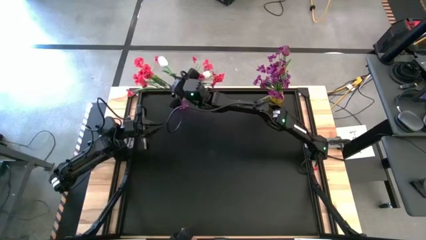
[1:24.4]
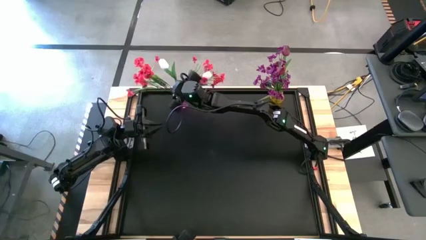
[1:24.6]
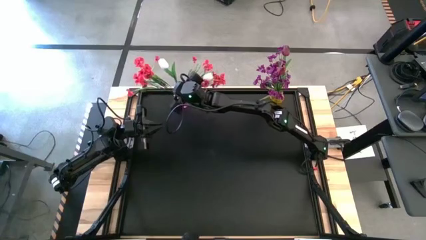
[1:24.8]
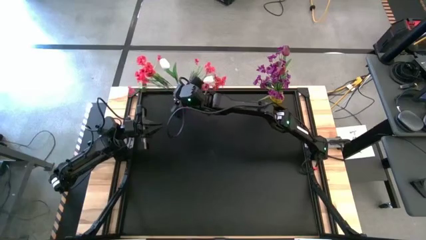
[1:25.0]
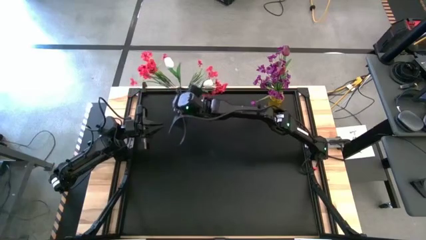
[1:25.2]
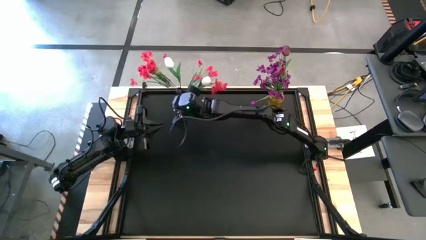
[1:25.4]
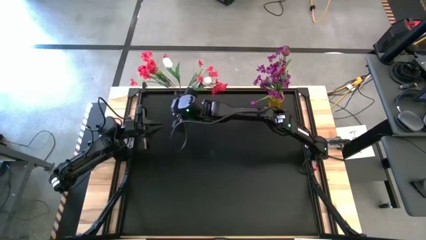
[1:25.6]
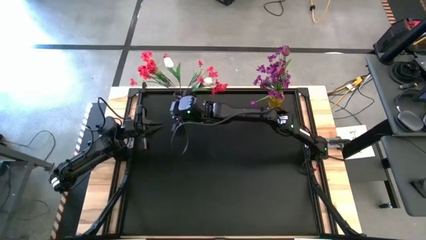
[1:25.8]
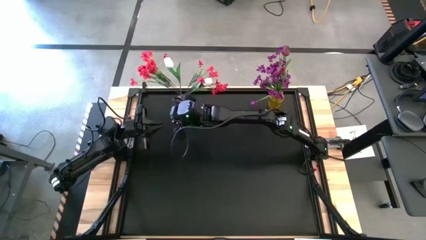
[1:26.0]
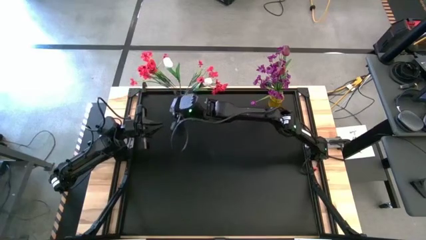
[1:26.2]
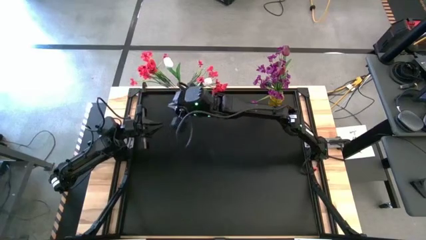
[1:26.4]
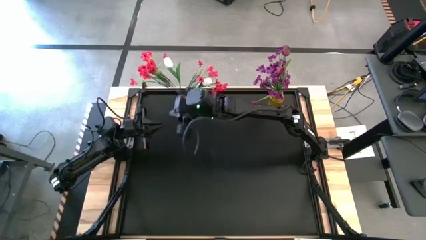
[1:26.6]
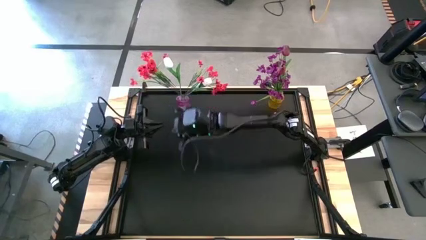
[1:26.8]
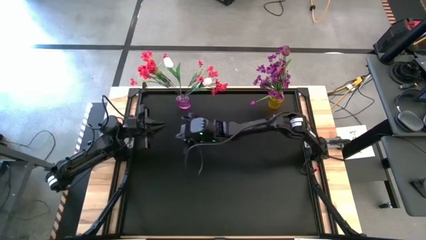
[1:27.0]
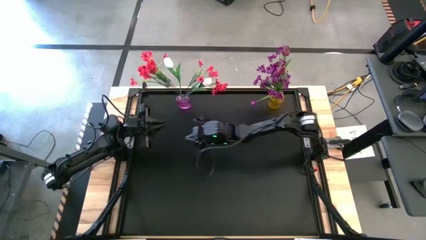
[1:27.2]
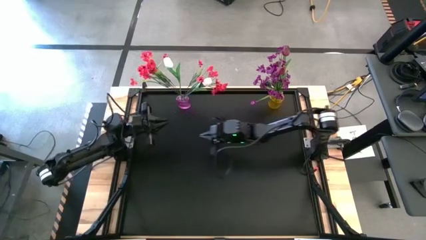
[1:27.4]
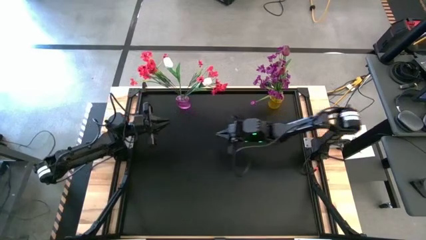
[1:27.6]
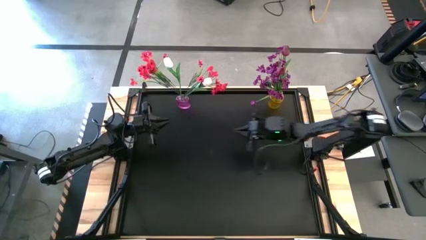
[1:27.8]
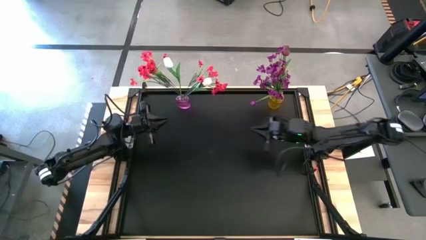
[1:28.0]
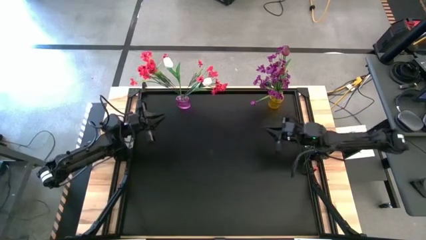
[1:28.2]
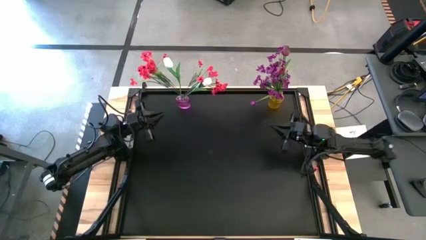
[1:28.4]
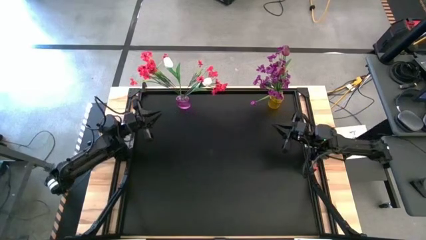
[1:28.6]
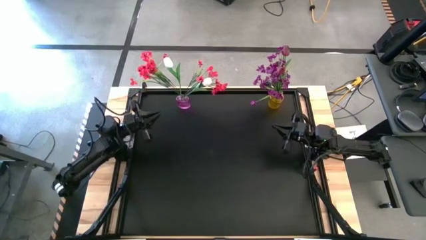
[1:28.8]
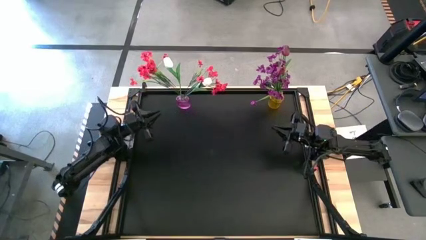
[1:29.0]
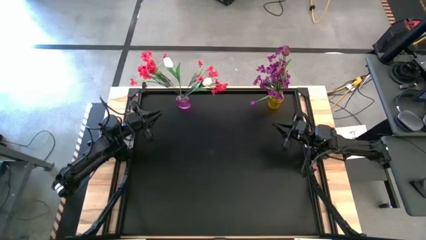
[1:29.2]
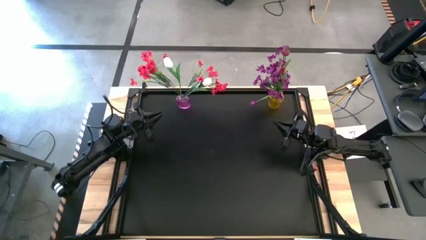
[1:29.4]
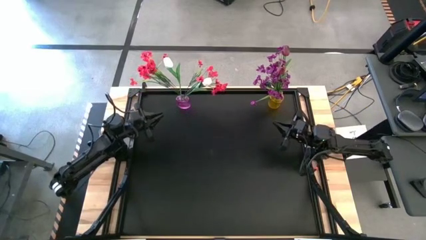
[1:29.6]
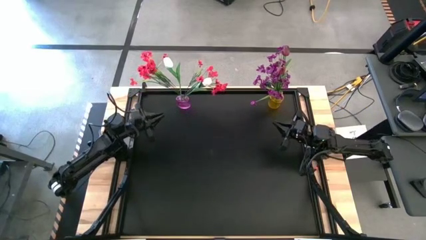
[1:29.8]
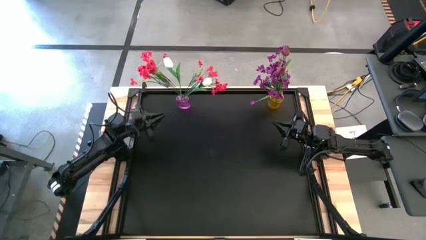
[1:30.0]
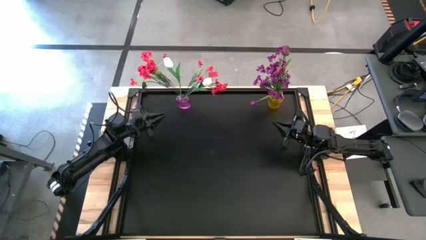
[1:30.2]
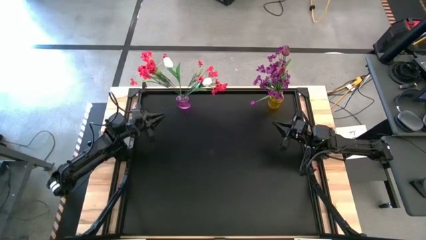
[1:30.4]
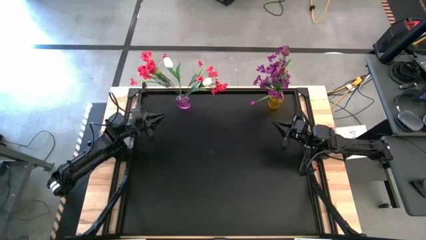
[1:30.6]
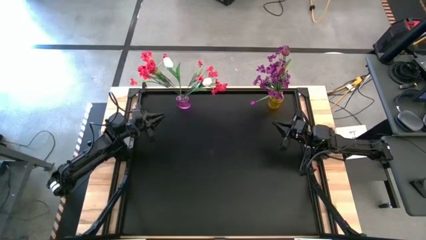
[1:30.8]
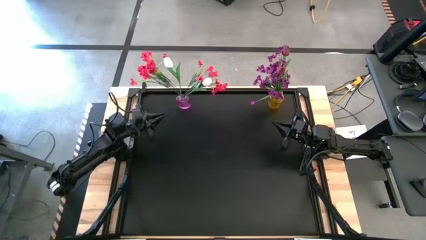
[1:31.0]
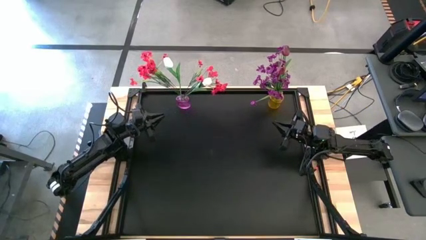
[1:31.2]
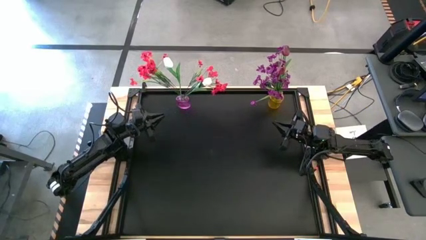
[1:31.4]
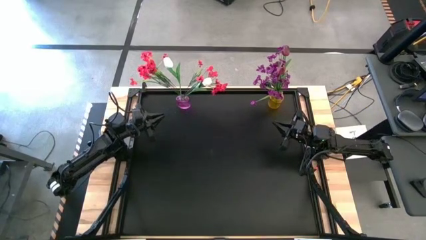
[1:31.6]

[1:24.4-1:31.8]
Task: Sort flowers into vase by color
Return to Home Position

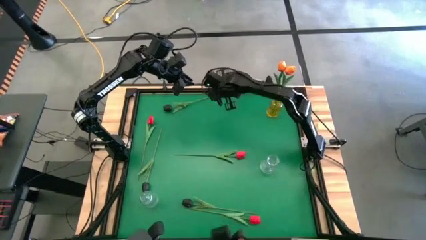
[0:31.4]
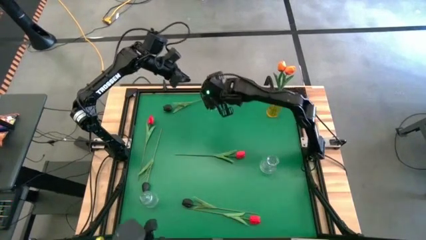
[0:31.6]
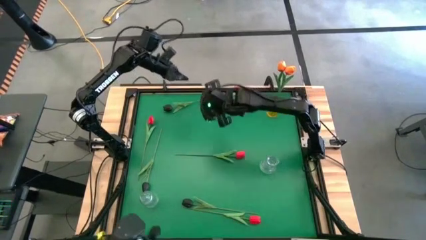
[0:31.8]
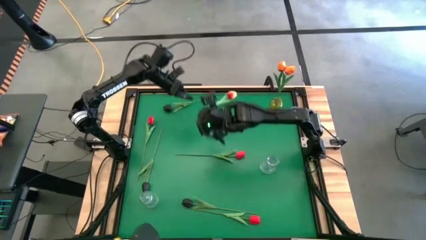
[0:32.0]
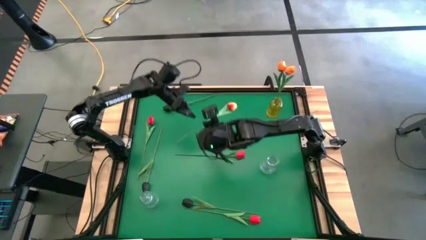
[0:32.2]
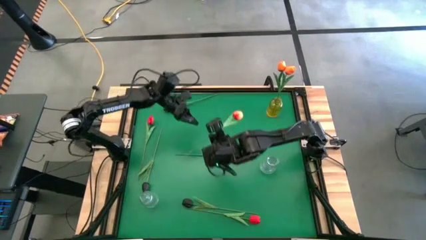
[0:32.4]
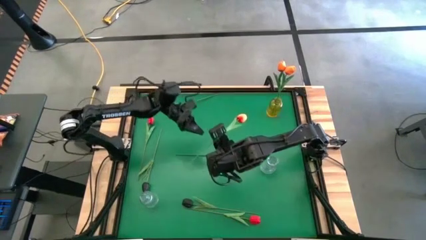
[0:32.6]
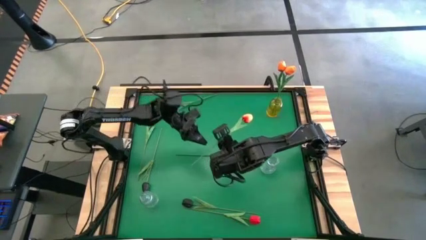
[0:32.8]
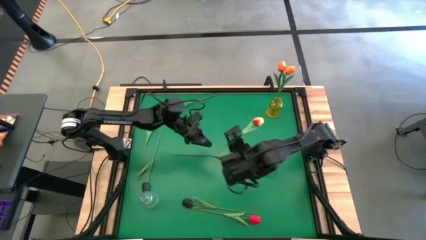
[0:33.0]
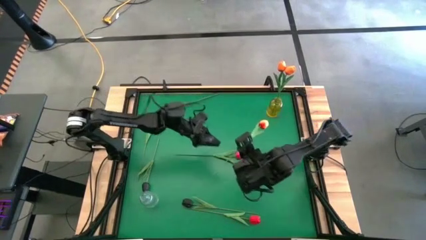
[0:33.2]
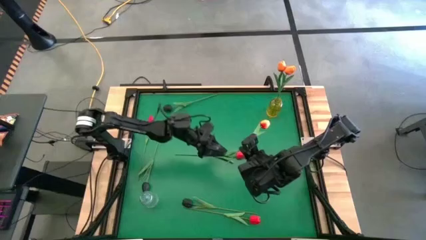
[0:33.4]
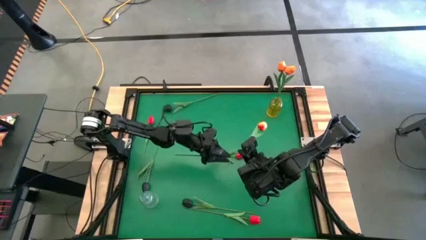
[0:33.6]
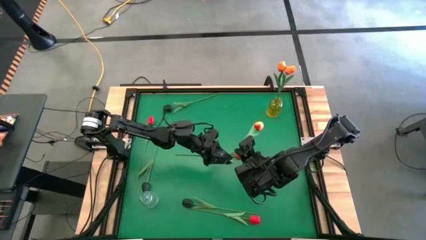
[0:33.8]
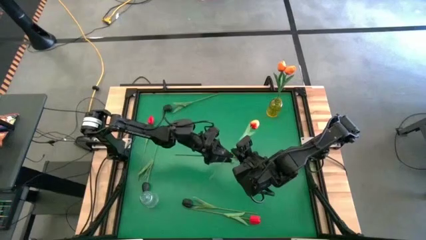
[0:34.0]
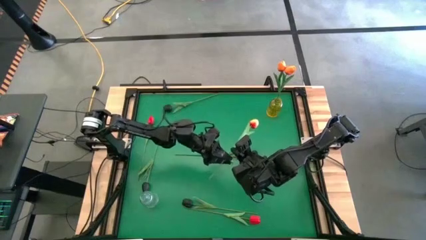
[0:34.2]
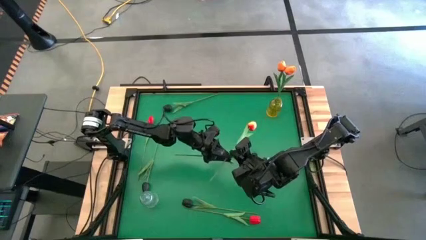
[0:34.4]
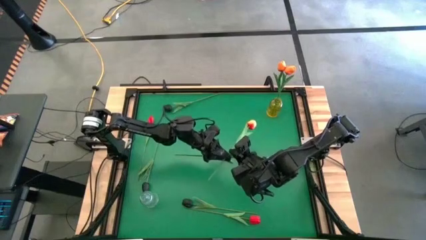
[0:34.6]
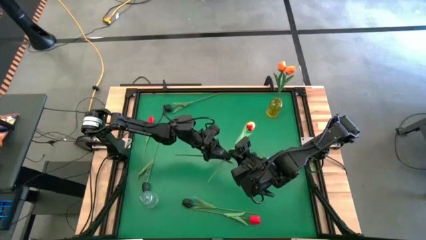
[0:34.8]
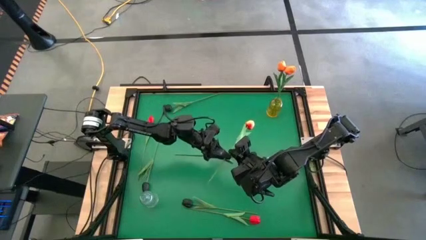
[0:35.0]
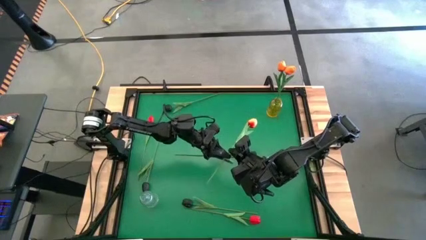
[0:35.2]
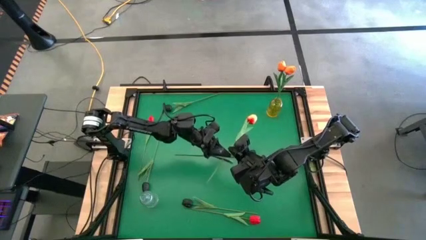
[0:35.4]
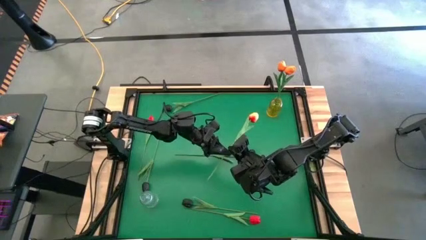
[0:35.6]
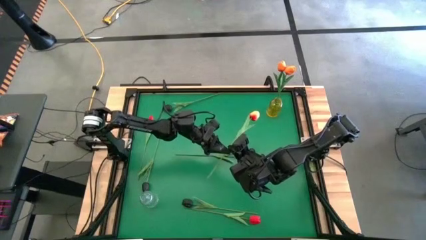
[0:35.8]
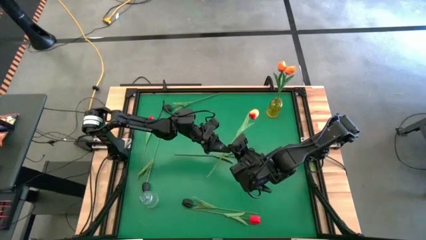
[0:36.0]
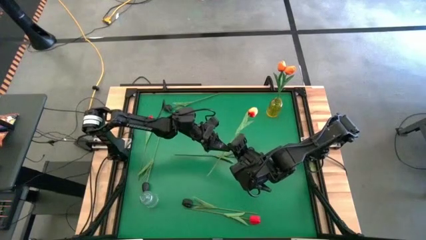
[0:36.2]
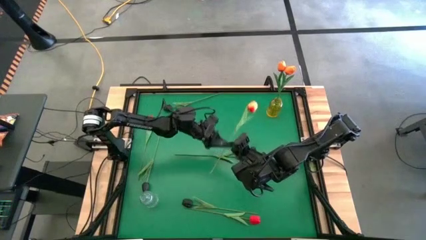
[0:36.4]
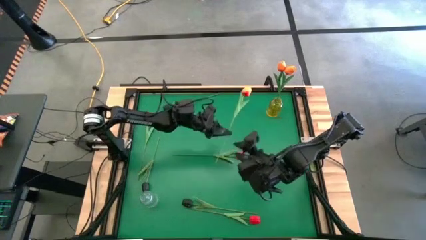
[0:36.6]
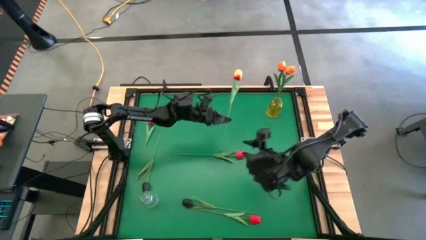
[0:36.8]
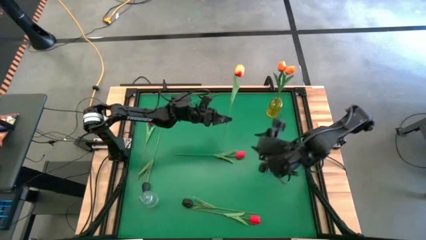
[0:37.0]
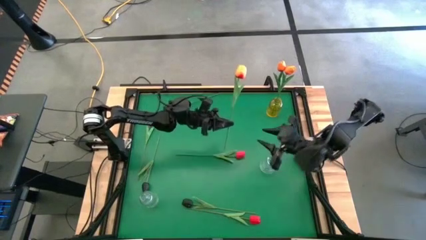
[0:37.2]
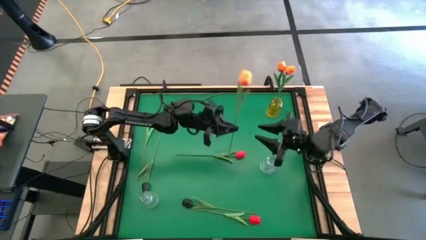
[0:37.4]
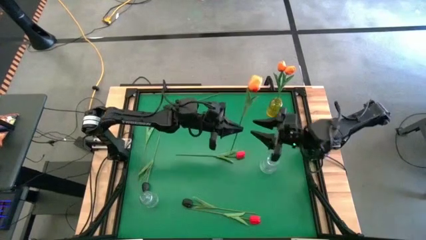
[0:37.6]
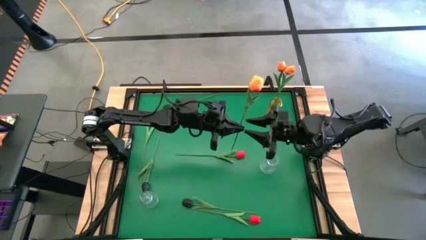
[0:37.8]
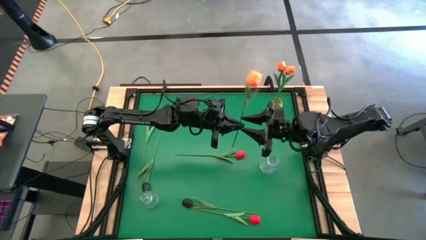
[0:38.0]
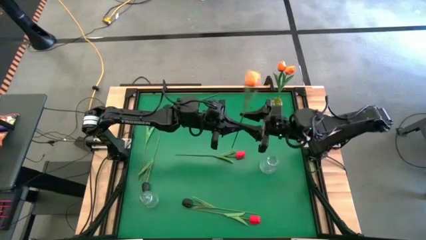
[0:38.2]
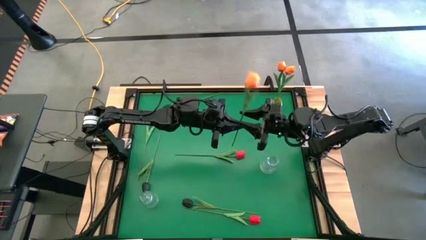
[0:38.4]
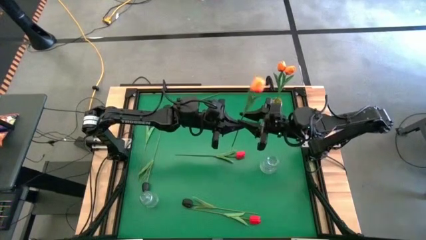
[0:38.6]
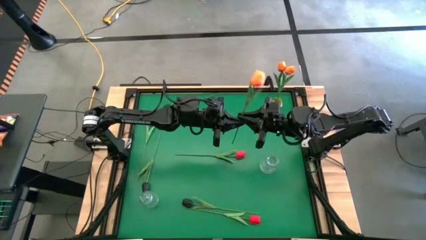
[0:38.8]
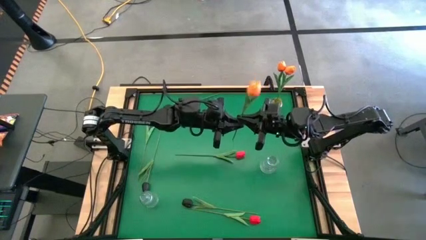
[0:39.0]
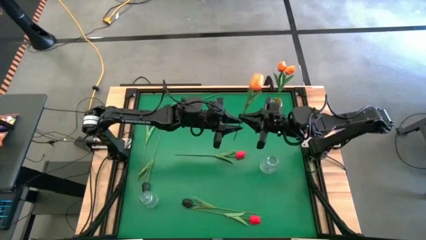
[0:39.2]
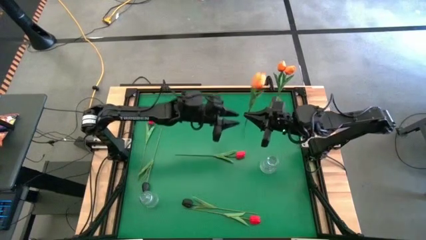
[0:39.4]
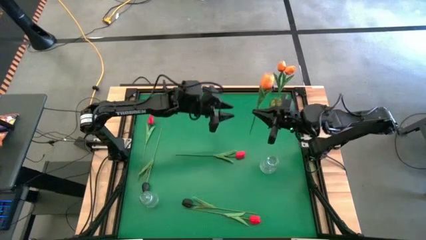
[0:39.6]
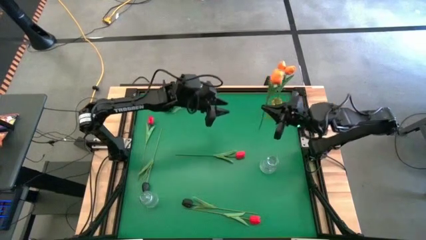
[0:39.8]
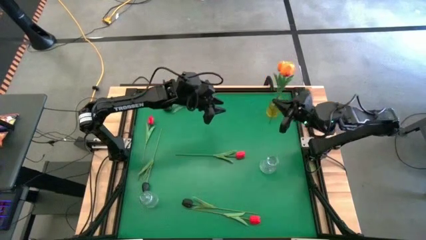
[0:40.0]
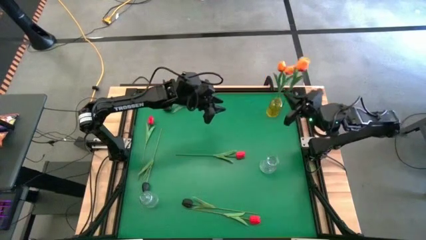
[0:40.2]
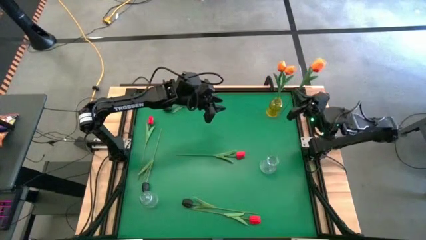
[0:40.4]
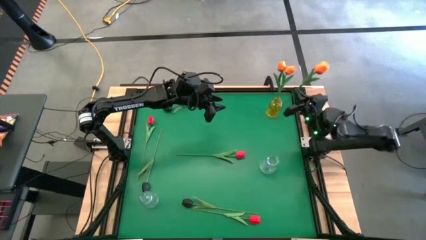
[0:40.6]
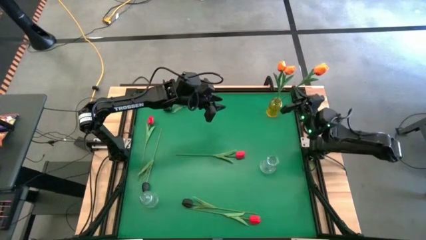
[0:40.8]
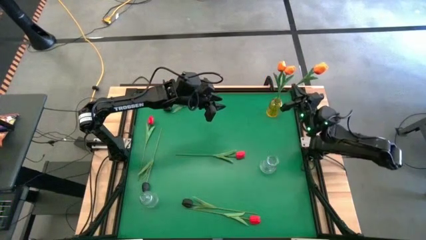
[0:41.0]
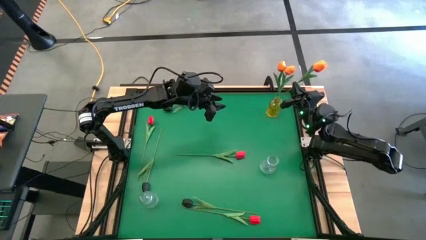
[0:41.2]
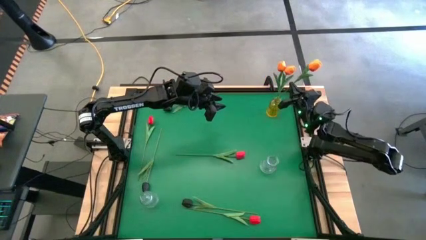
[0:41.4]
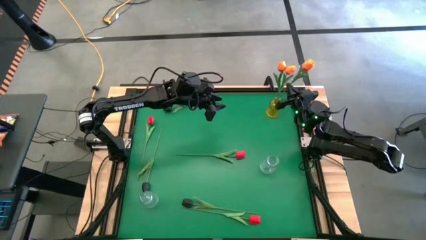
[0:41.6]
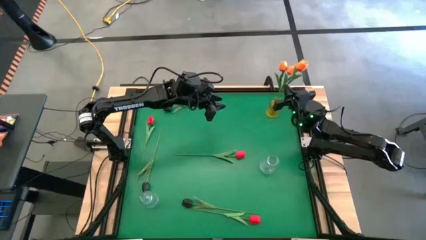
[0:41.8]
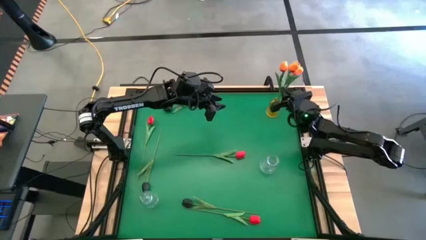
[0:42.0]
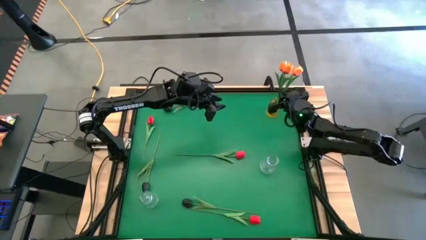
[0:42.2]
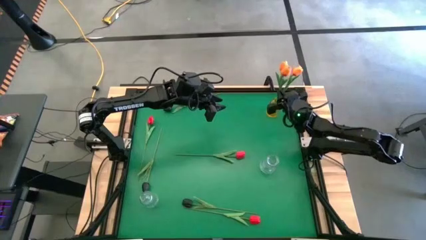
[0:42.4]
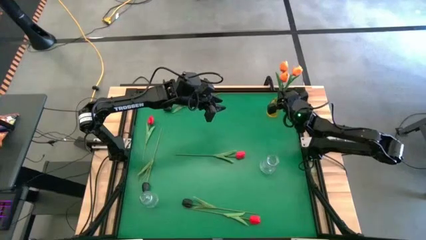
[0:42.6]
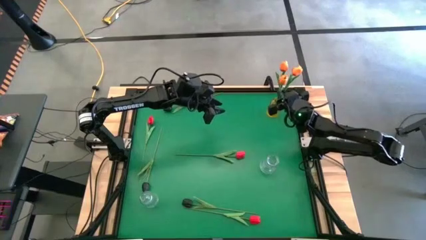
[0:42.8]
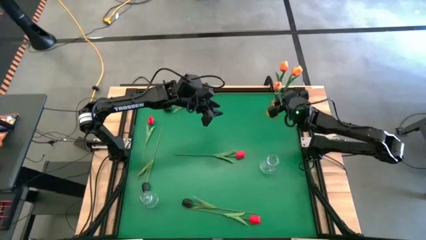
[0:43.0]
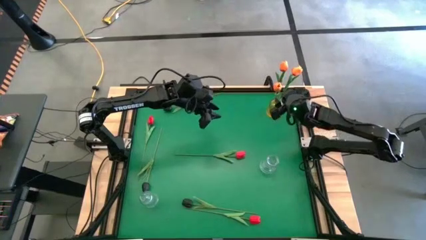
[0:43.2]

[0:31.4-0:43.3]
Task: Sort flowers into vase by color
Put the orange tulip into the yellow flower vase
